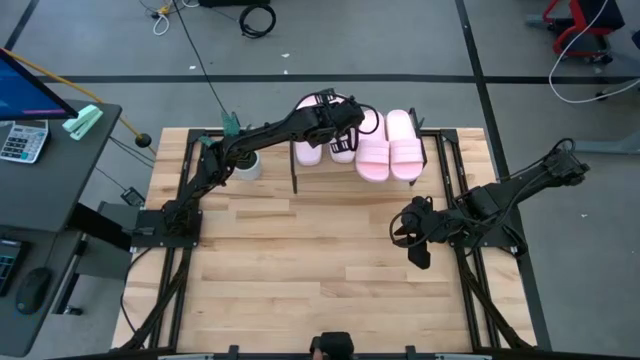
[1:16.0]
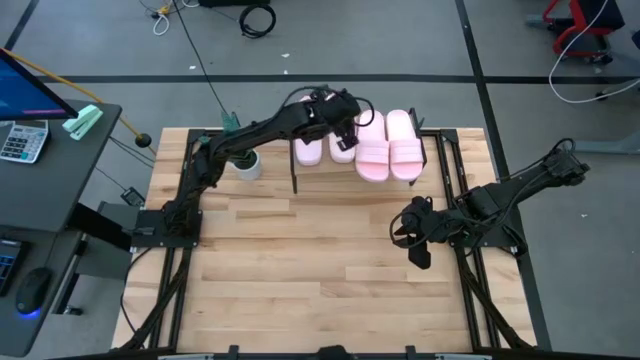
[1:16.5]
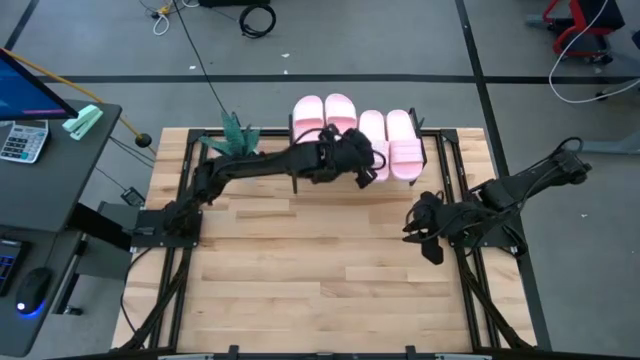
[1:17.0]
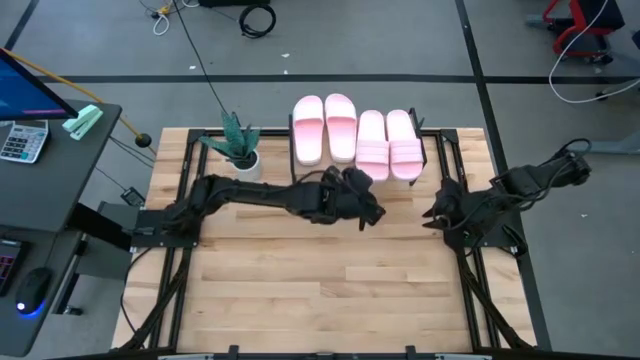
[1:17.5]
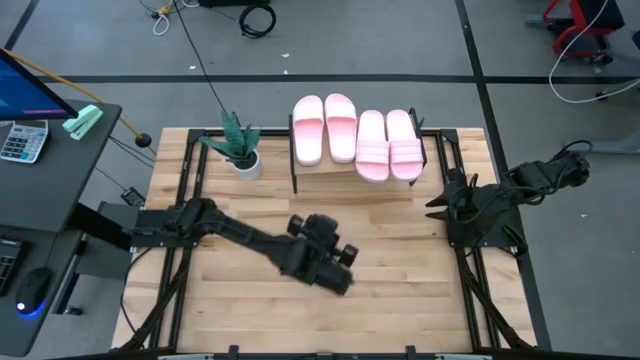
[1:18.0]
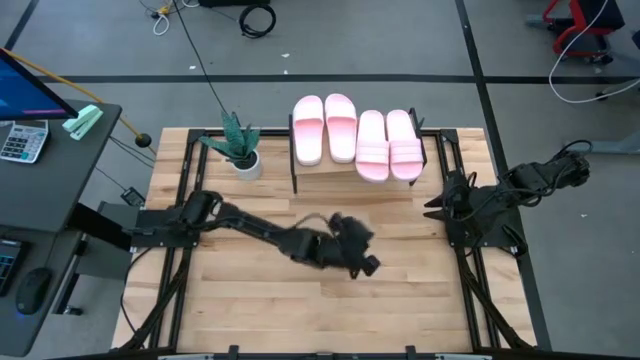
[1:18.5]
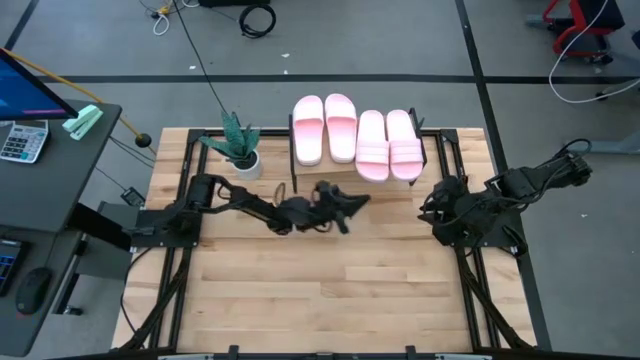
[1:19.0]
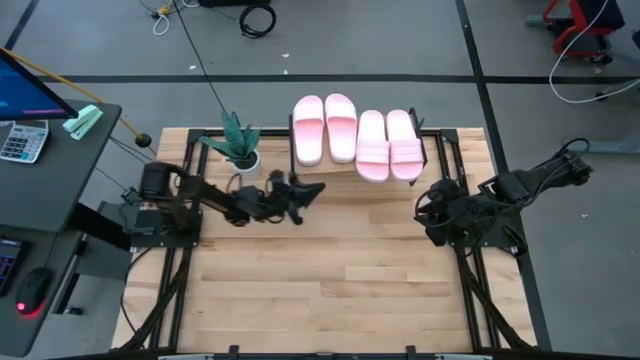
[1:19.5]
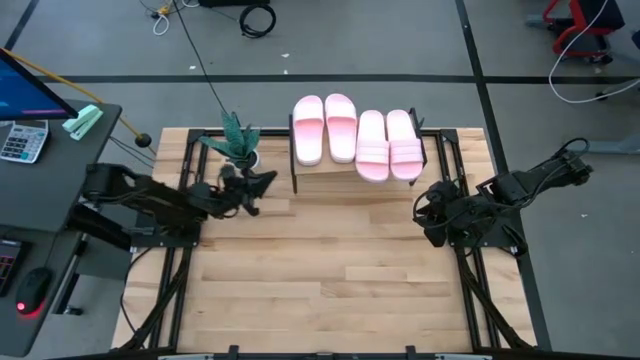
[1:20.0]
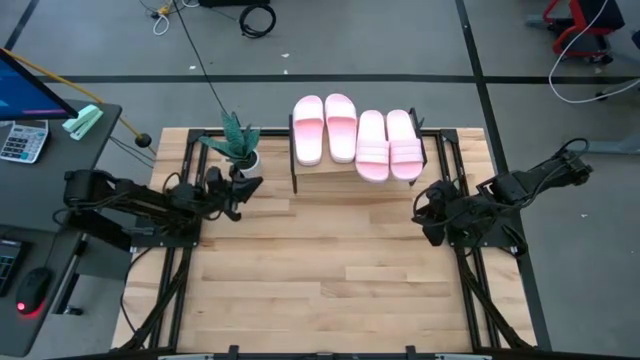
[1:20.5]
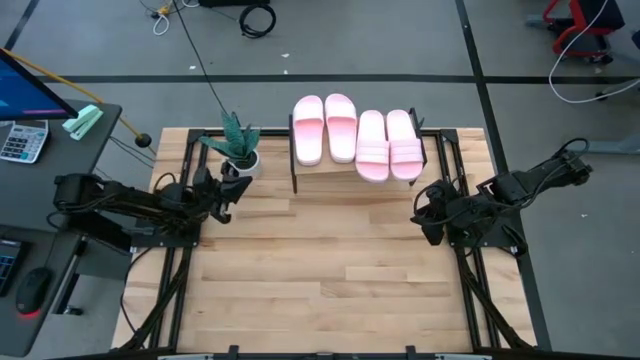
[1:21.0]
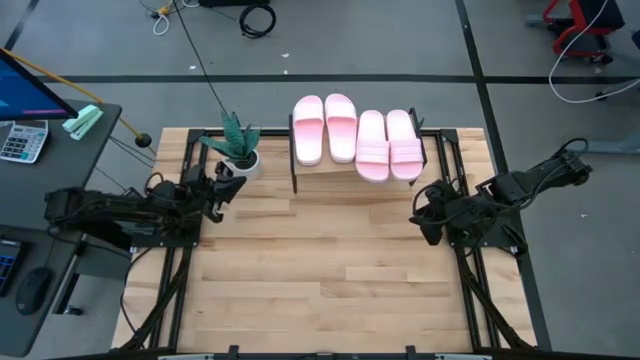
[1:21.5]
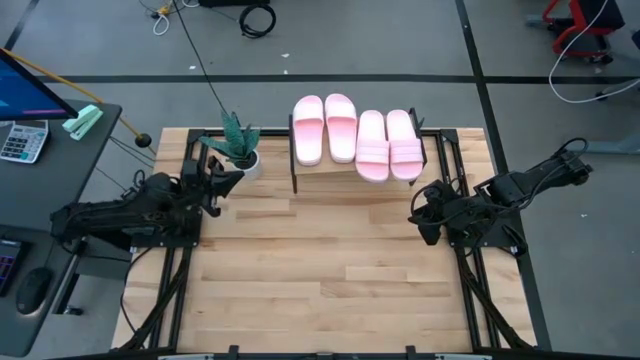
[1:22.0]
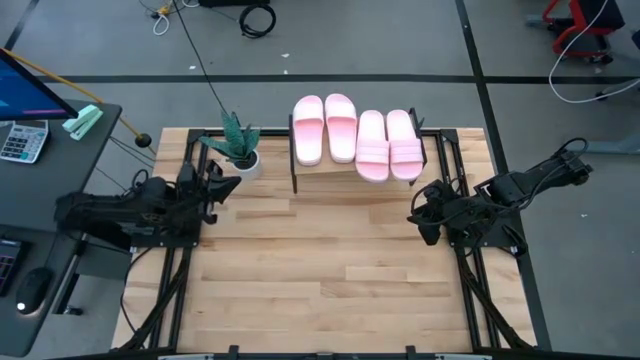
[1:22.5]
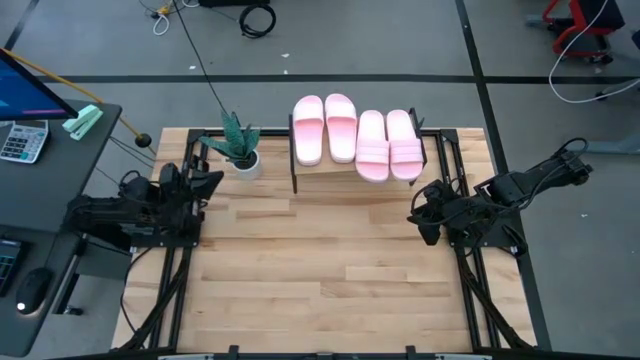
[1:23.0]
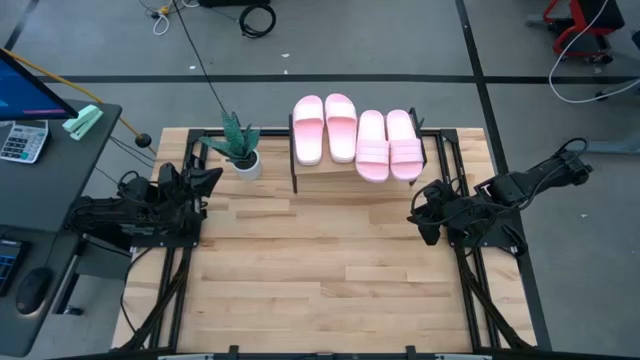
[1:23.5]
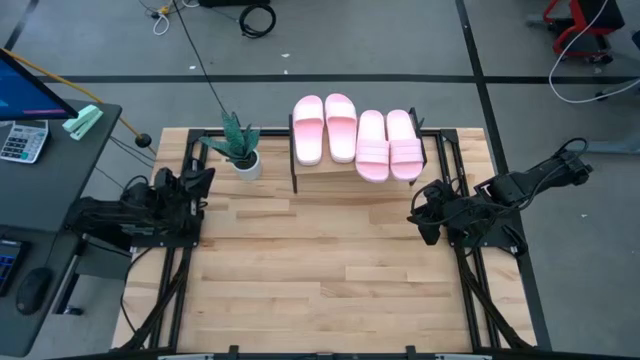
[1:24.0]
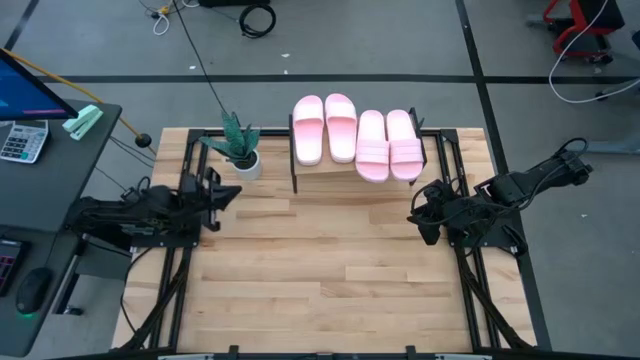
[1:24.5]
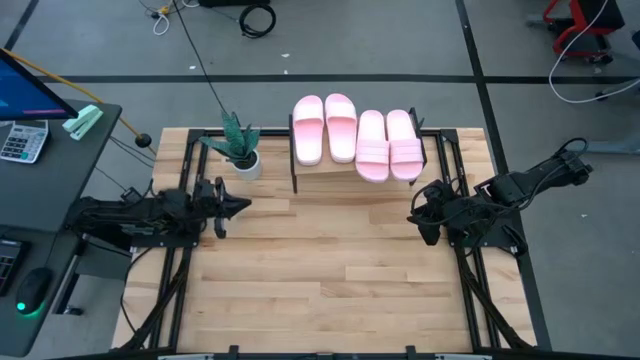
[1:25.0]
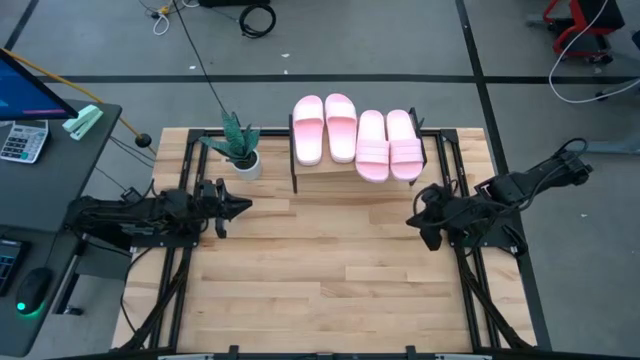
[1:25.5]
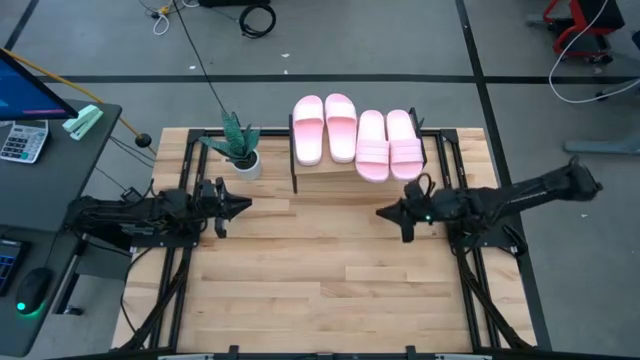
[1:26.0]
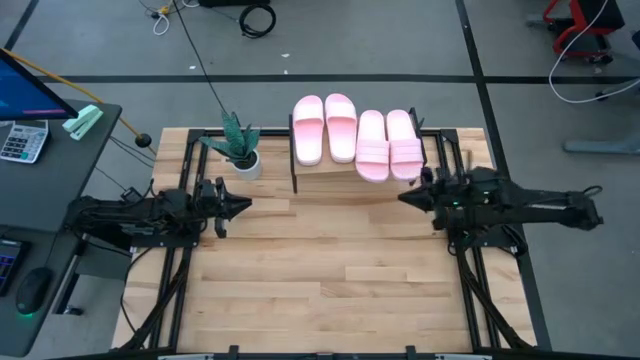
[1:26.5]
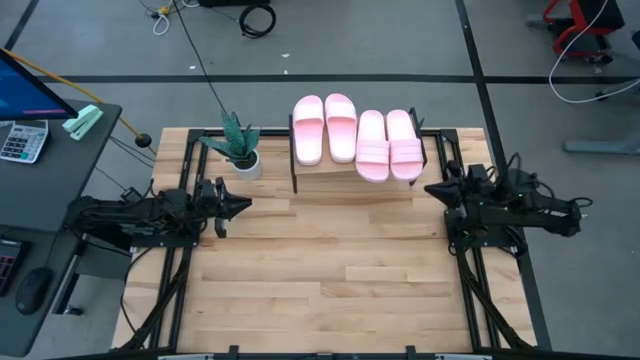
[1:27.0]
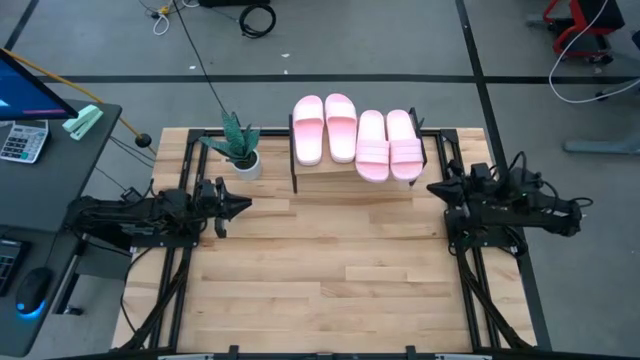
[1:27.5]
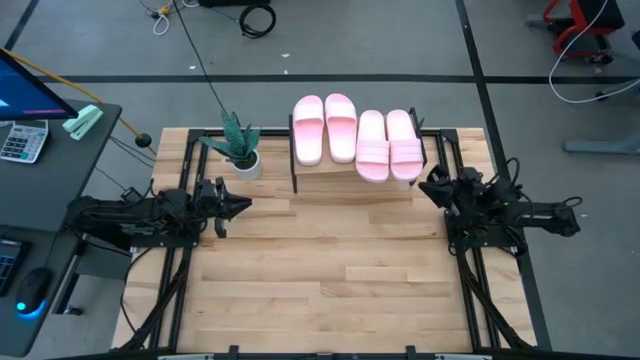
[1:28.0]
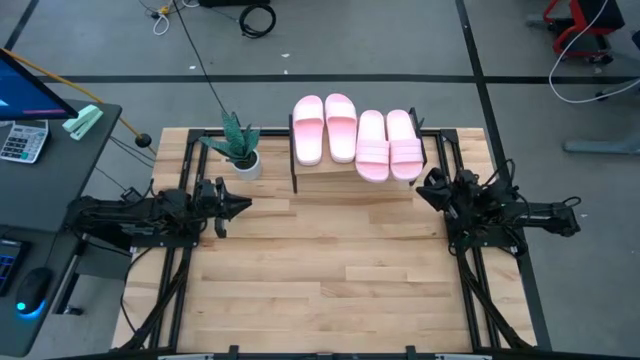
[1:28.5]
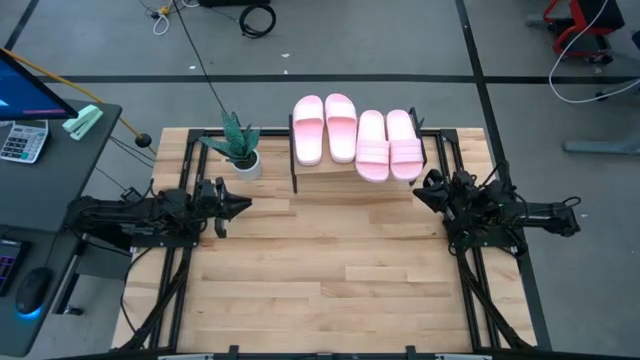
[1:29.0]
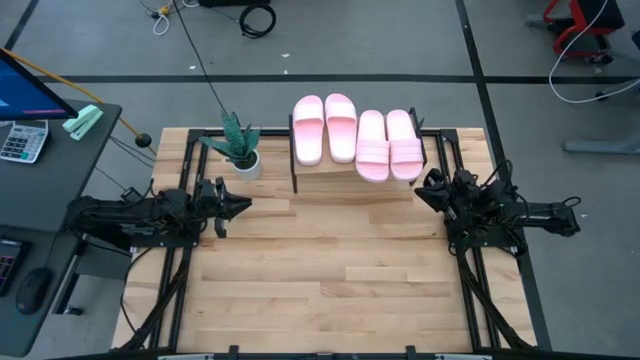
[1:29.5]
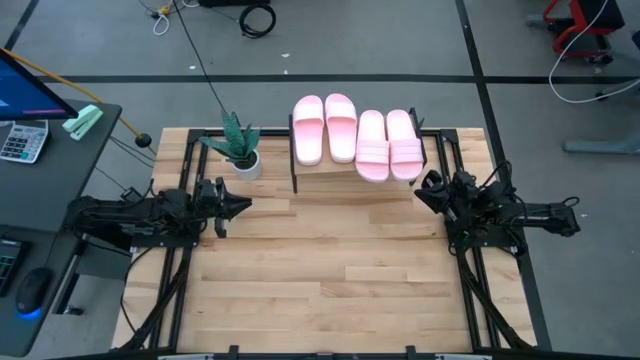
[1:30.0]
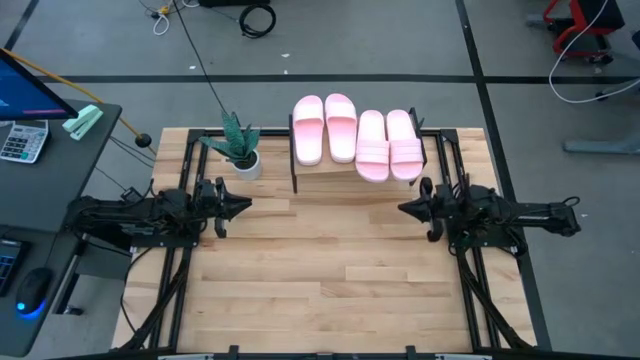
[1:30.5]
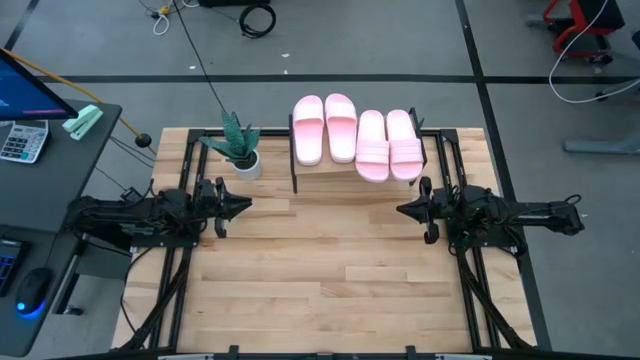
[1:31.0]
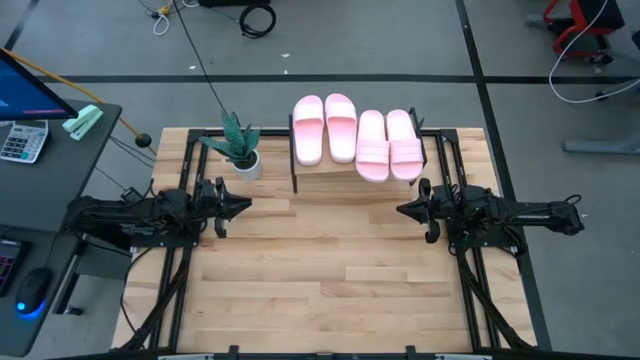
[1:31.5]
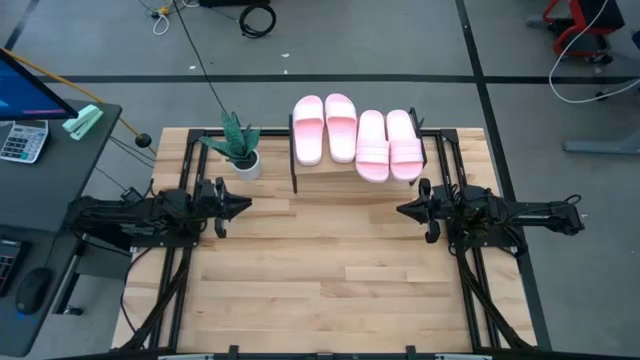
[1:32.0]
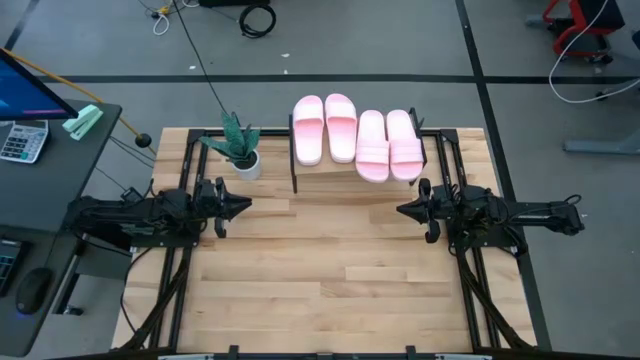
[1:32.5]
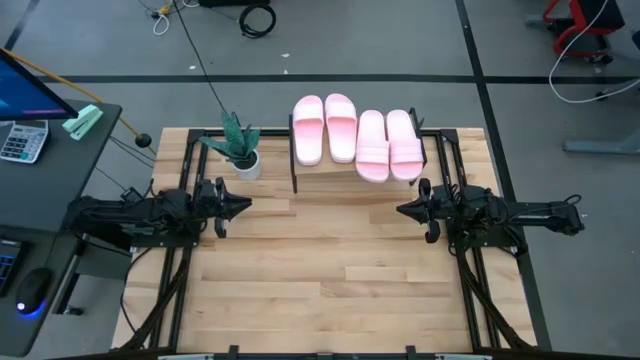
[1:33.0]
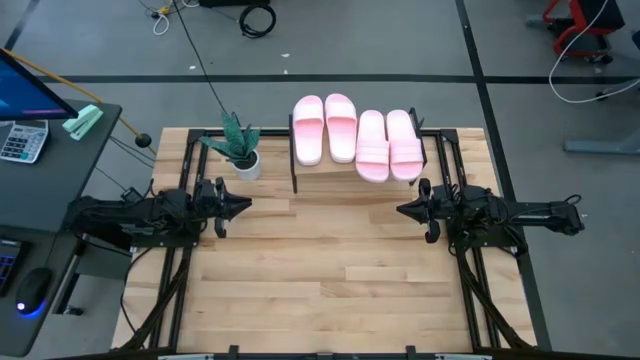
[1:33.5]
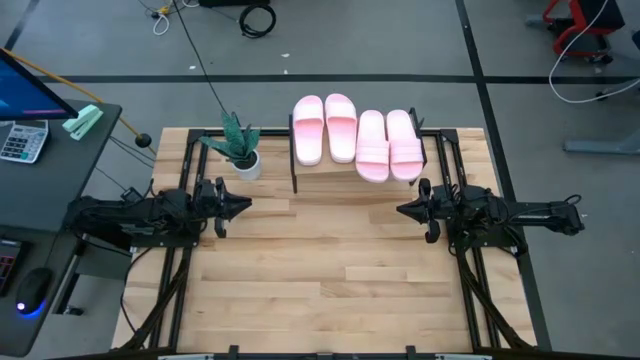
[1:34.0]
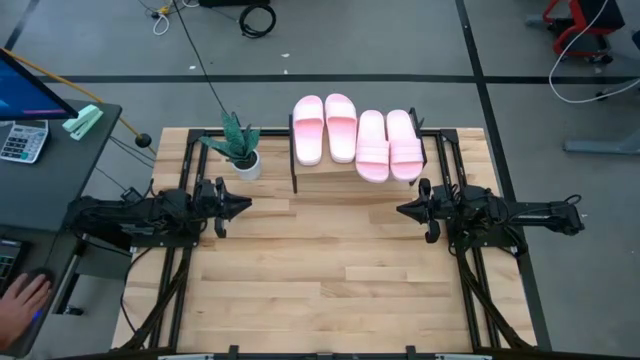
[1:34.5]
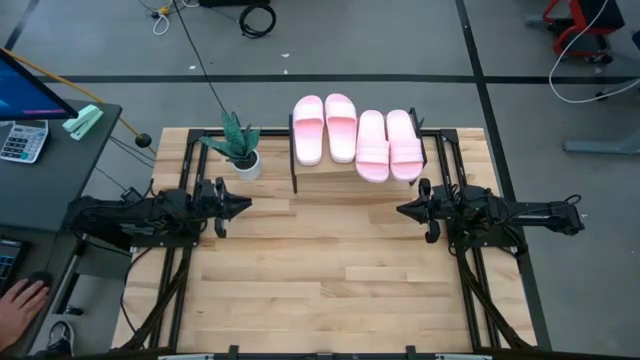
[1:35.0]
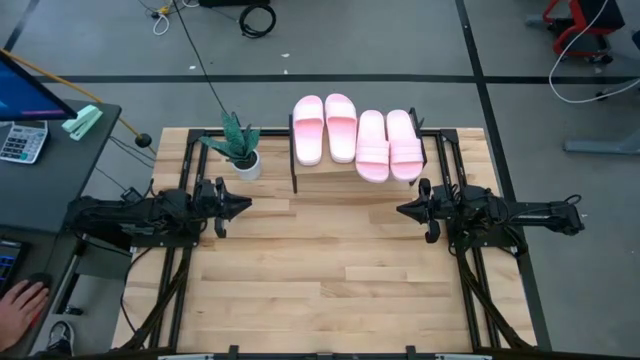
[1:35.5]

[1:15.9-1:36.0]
Task: Pick and place slides into the shelf
Return to Home Position

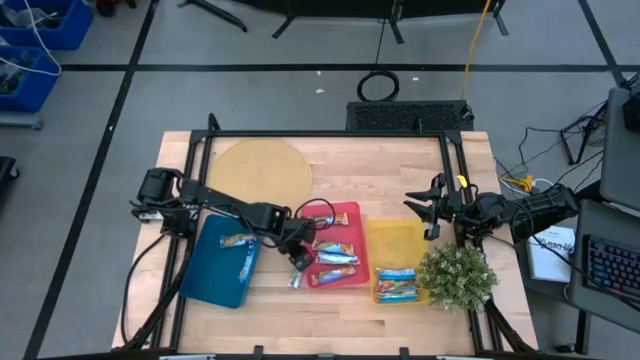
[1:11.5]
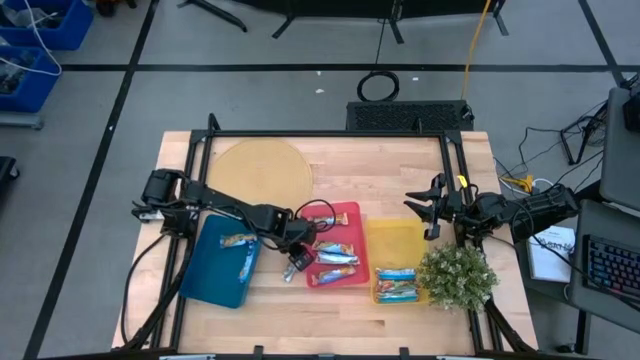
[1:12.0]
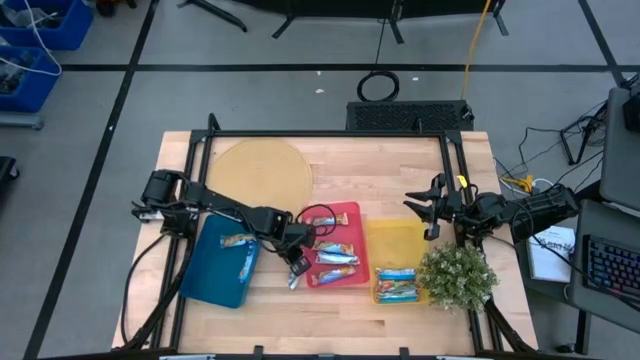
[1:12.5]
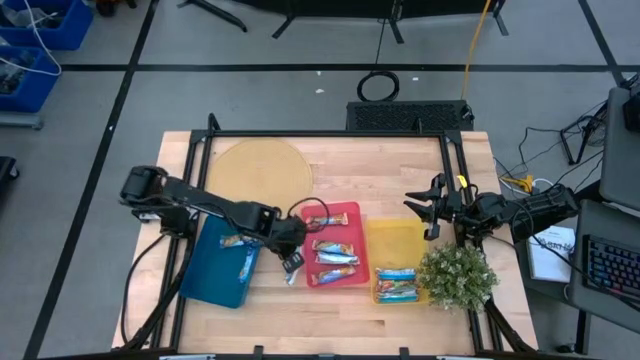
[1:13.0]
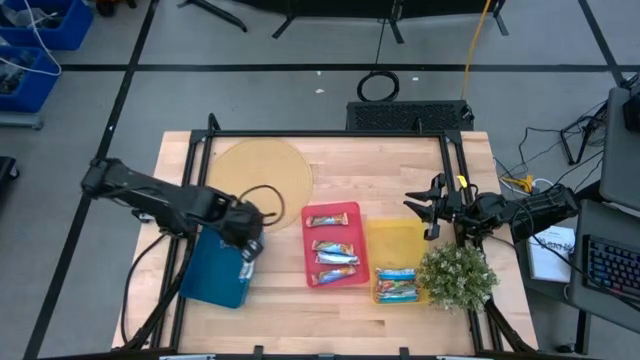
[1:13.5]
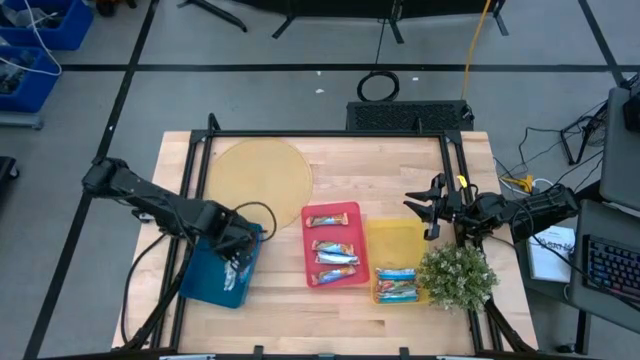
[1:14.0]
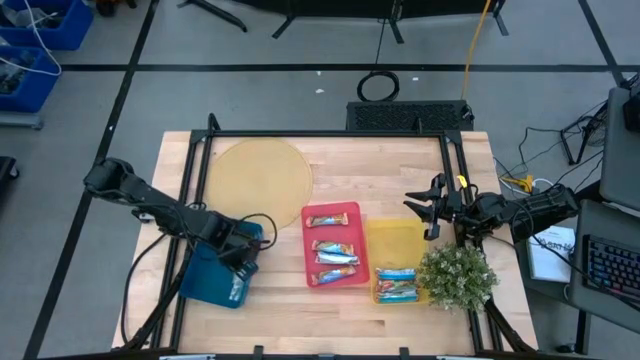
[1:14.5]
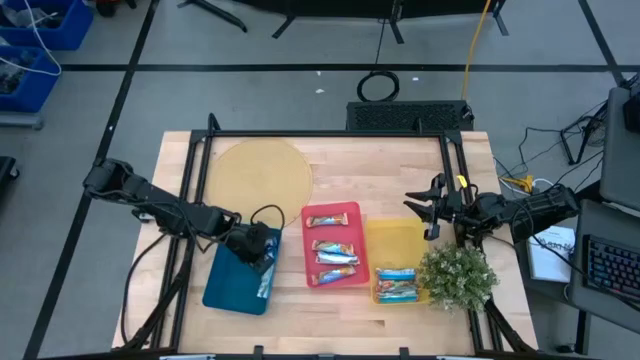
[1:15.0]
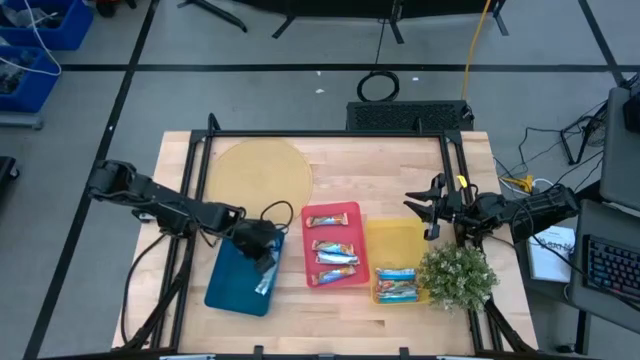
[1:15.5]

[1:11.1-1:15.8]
Task: Pick and place Granola Bars by type
Put the blue granola bar into the blue bin
